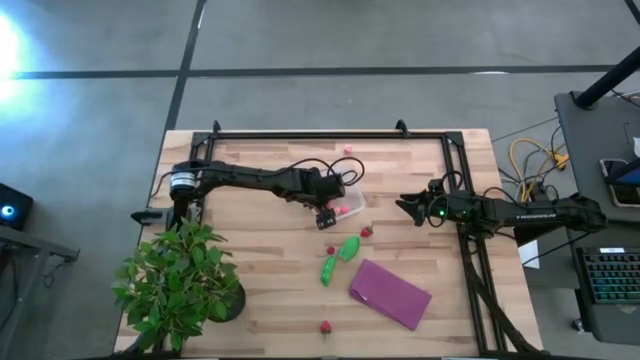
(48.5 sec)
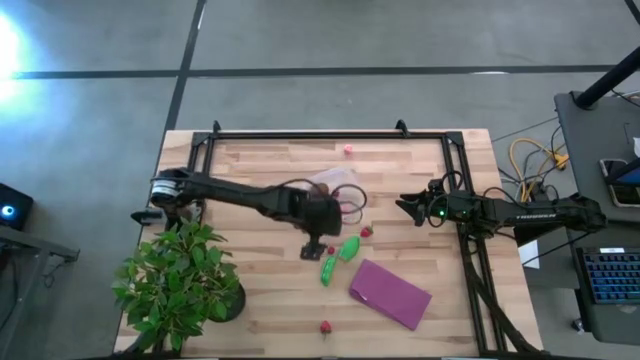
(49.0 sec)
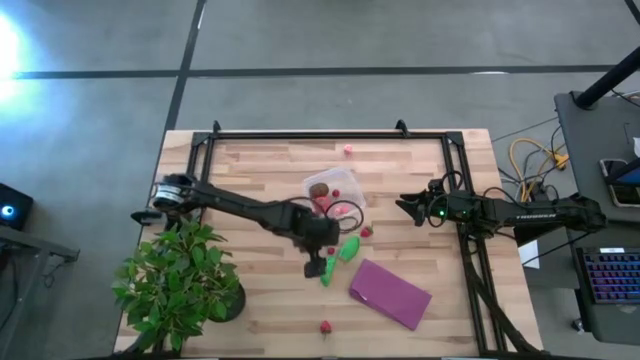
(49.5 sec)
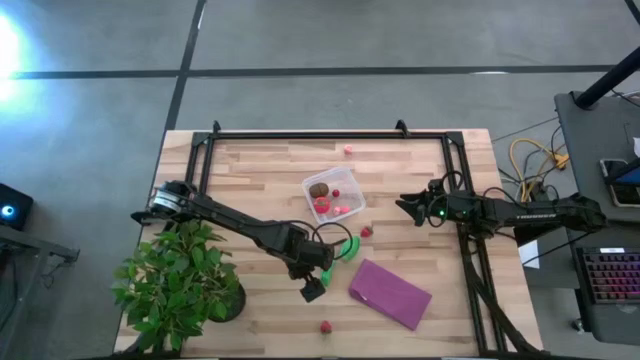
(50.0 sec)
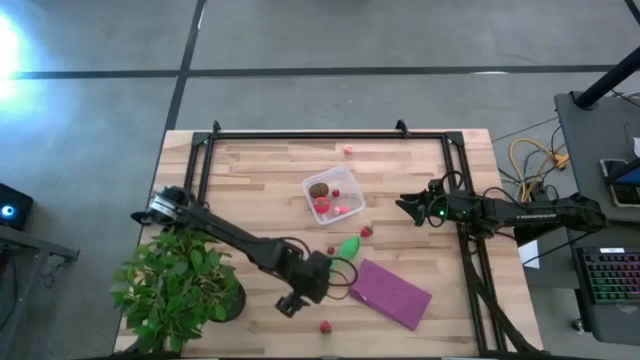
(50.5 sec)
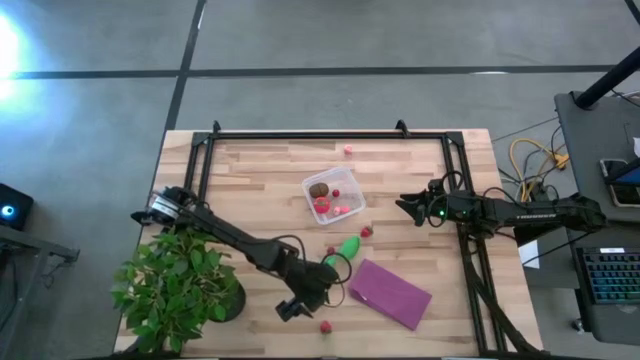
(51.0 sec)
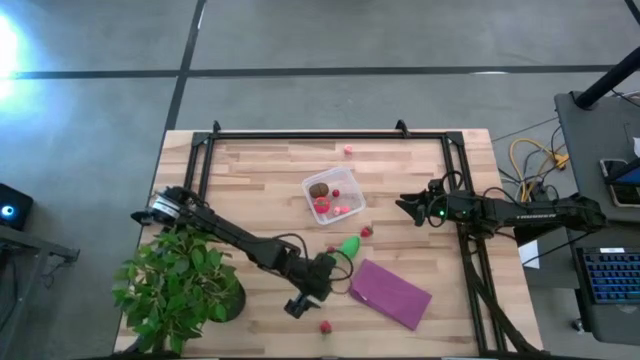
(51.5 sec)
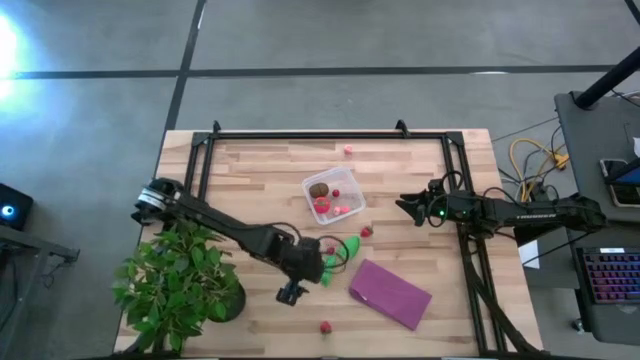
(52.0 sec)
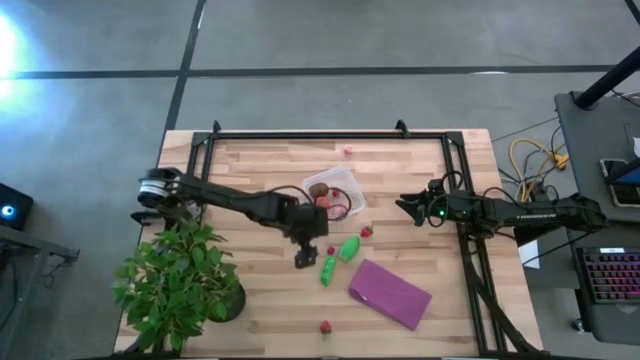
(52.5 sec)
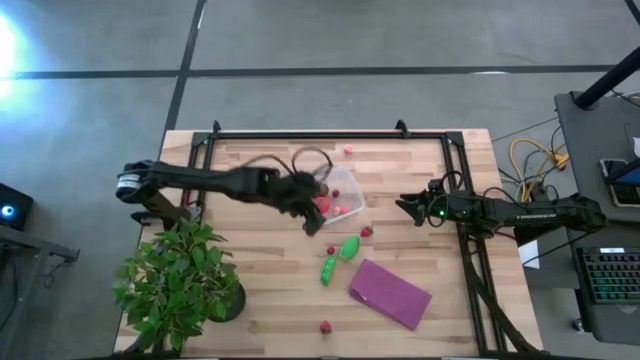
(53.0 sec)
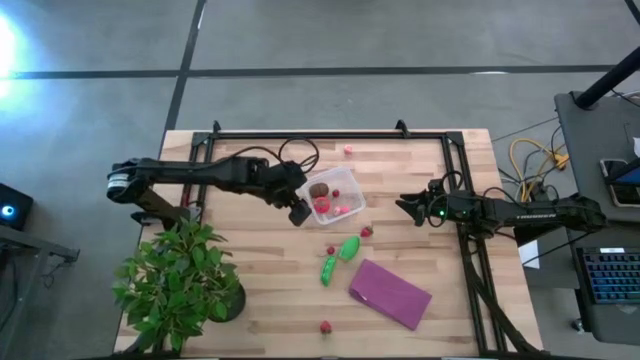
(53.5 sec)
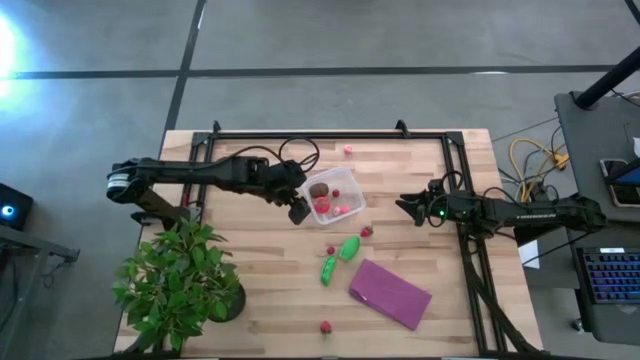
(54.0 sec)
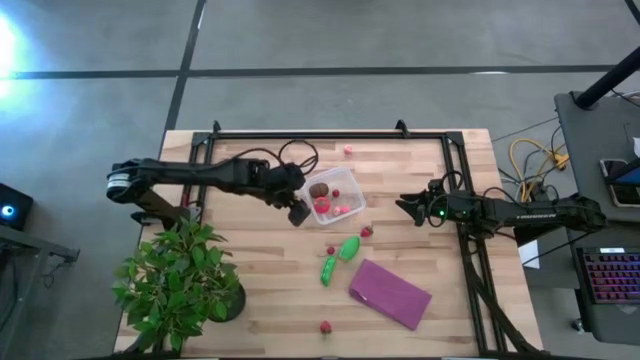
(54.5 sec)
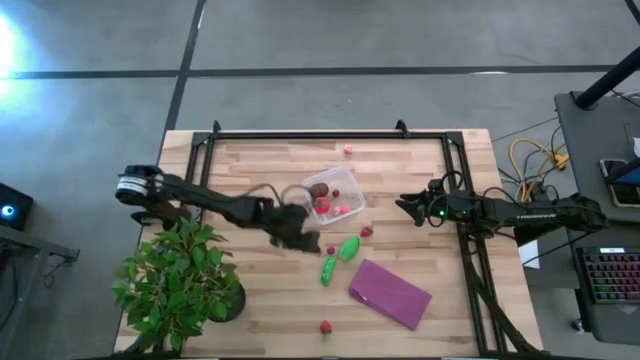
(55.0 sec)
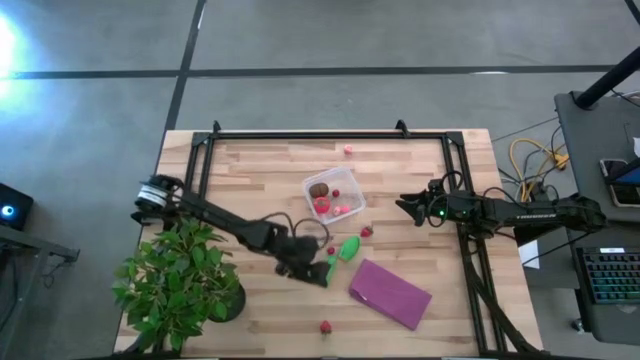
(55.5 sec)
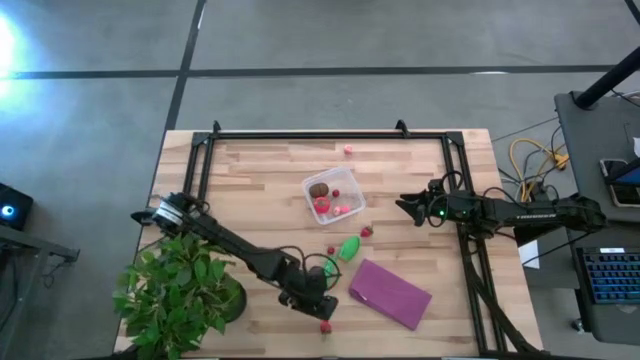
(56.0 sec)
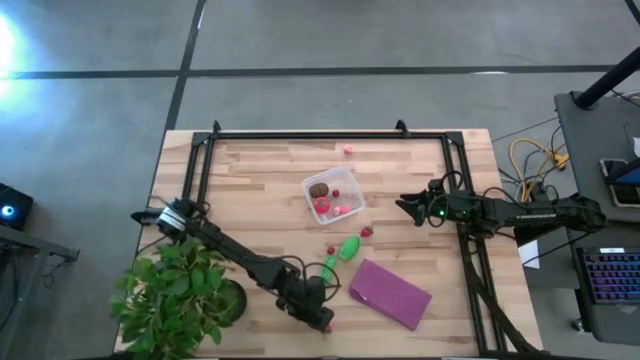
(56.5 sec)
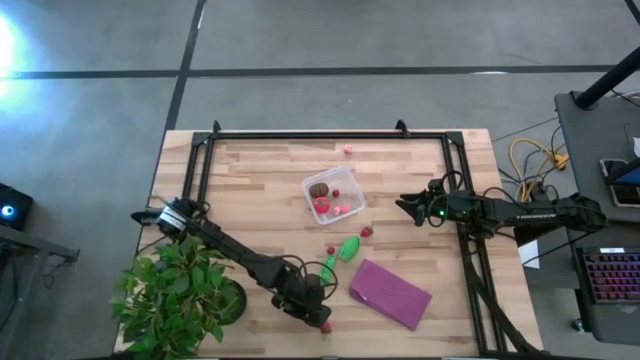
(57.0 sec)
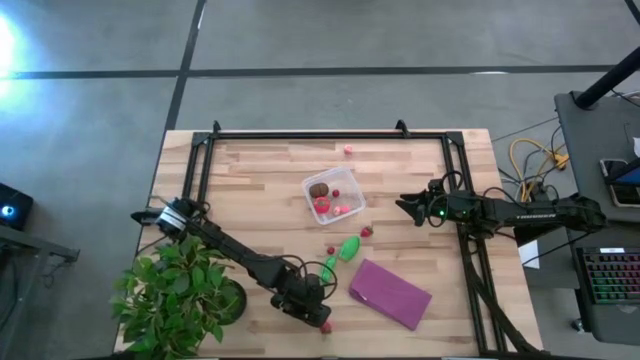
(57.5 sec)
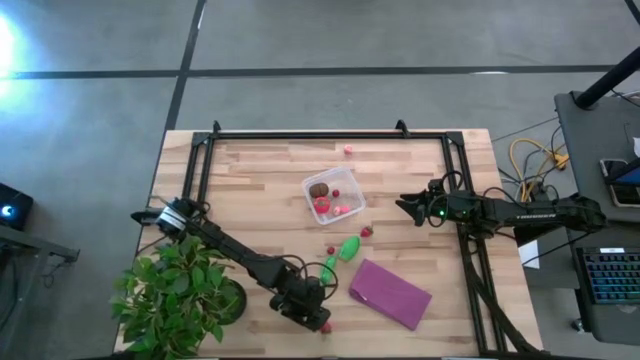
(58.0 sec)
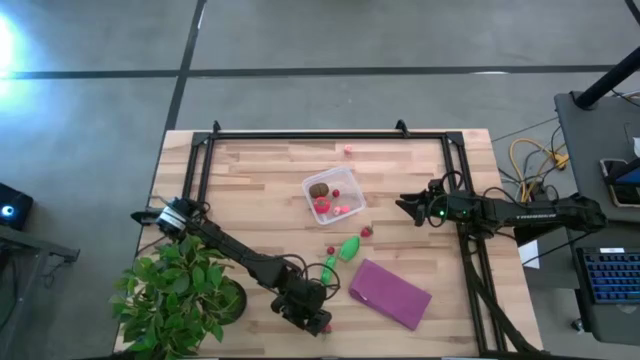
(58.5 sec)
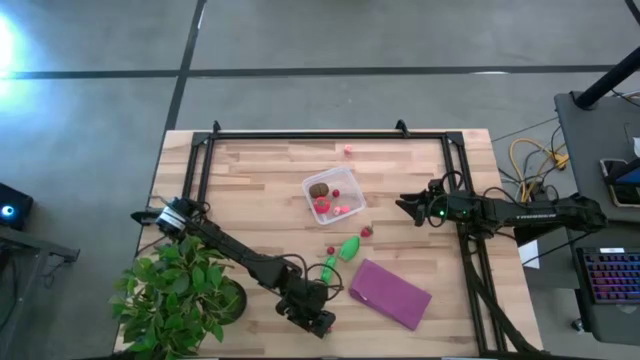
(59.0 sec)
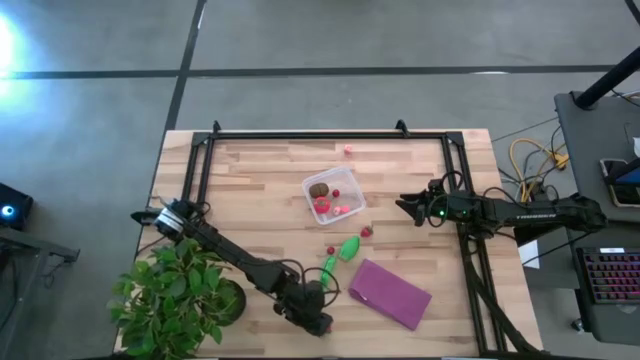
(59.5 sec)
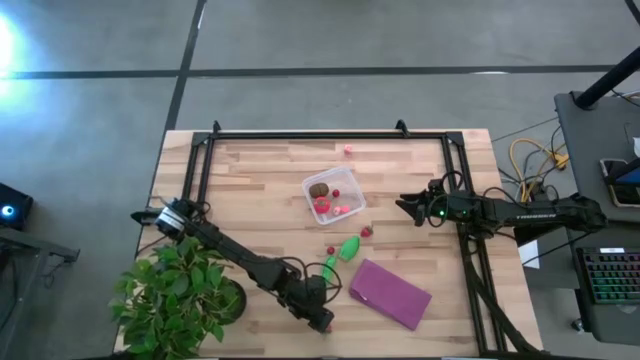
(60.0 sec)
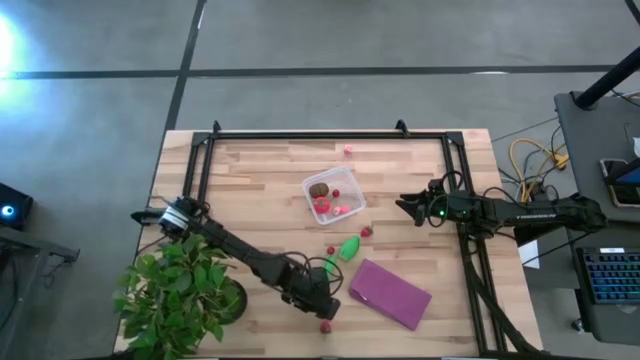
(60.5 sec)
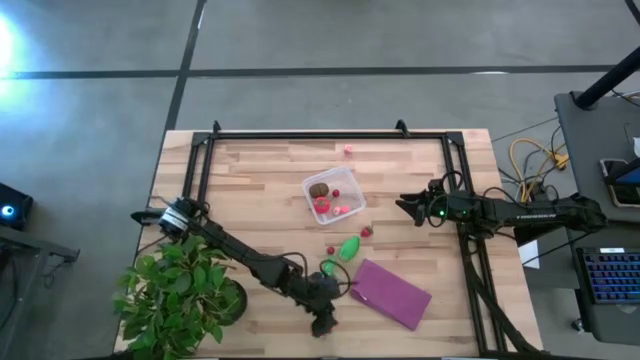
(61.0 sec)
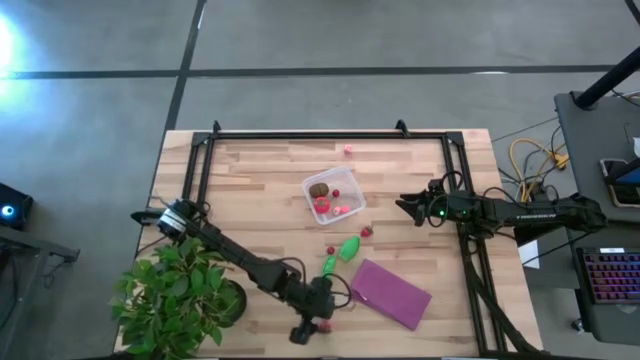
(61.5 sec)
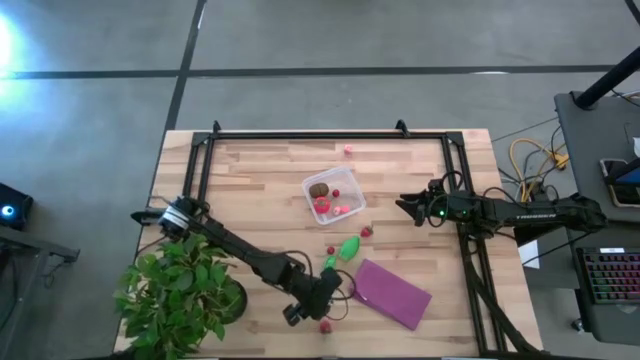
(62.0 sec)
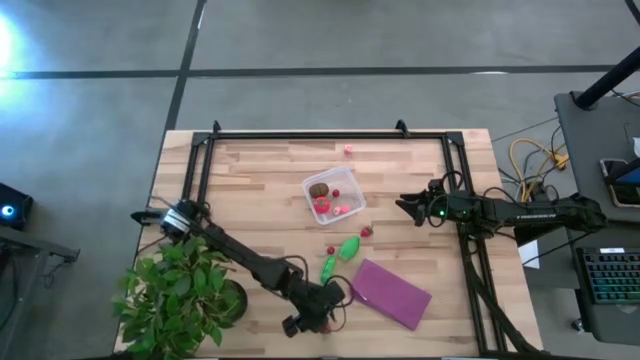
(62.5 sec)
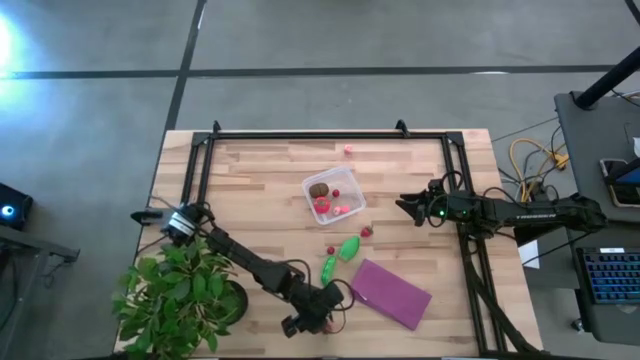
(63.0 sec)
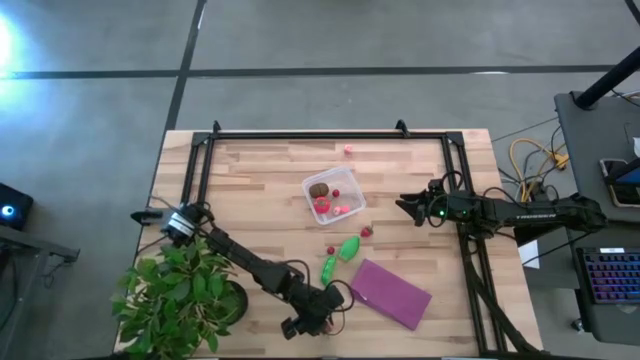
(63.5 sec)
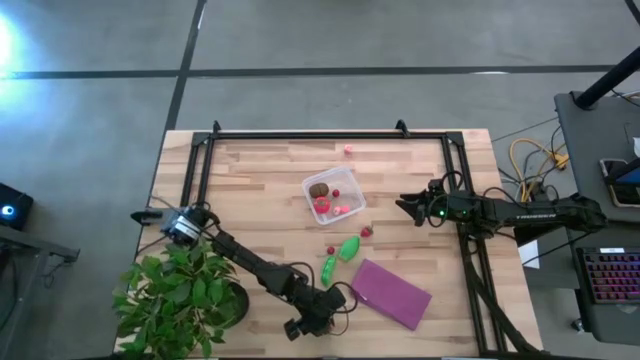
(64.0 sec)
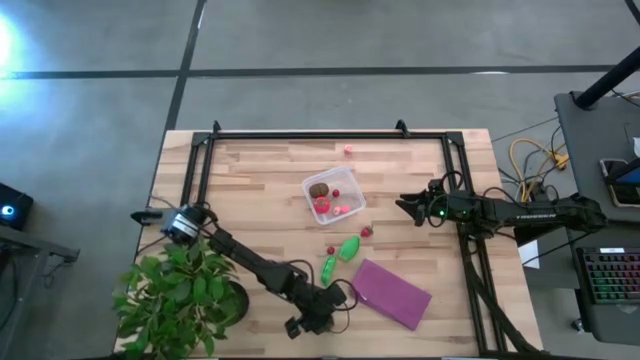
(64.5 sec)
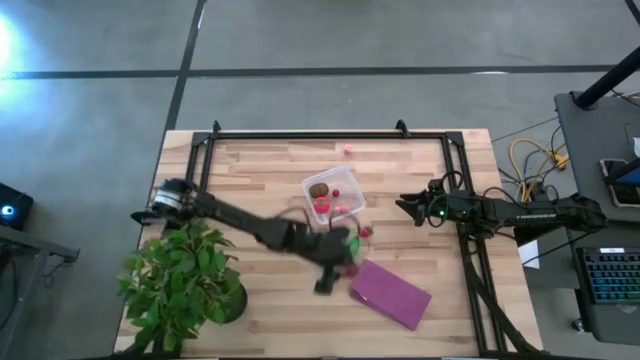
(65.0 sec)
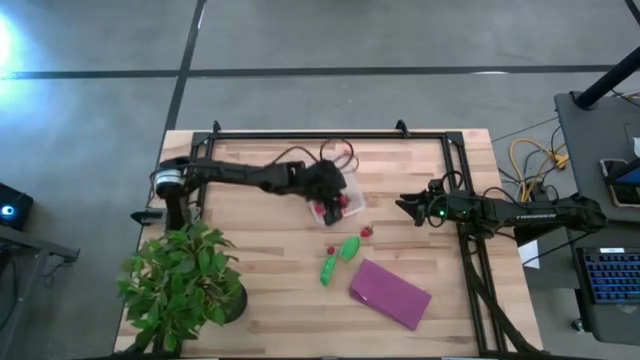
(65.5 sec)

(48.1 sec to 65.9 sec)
Task: Pick and placing Produce into tupperware
Put the bottom red strawberry into the transparent bin

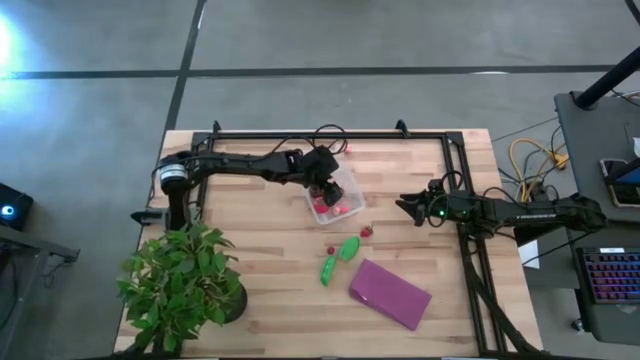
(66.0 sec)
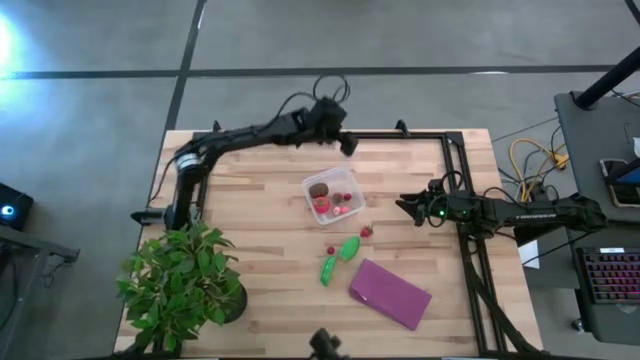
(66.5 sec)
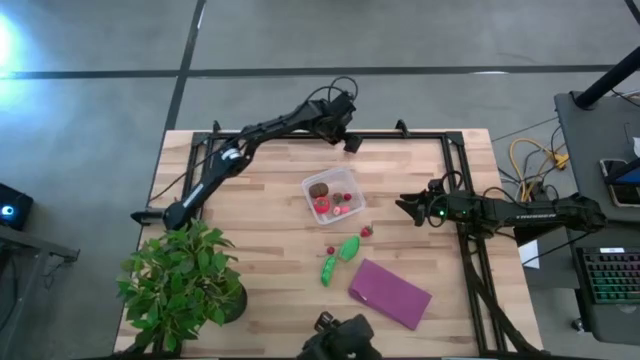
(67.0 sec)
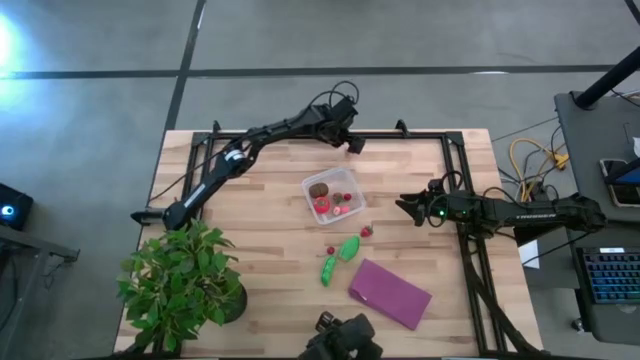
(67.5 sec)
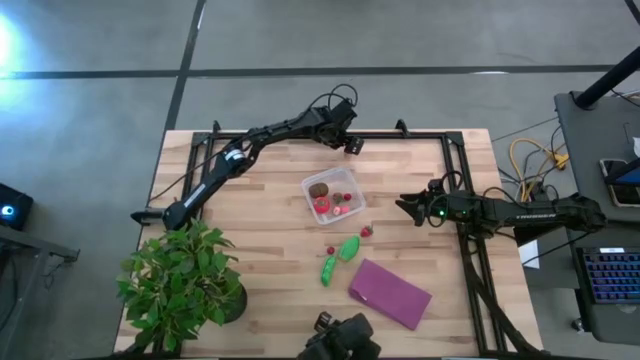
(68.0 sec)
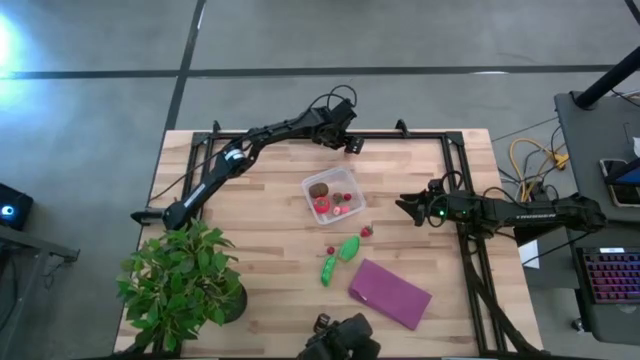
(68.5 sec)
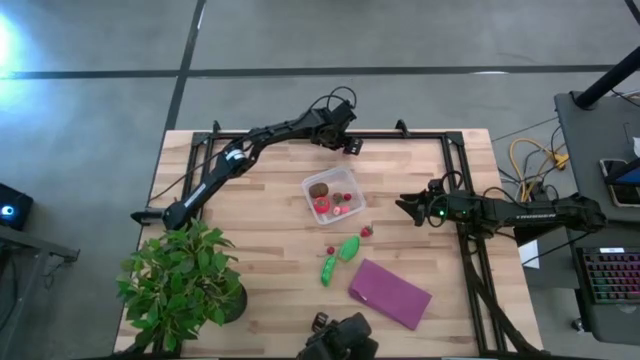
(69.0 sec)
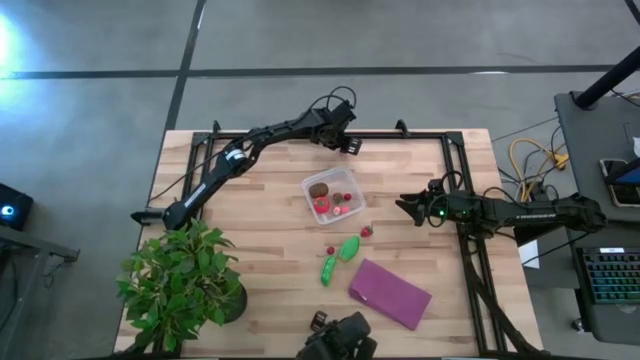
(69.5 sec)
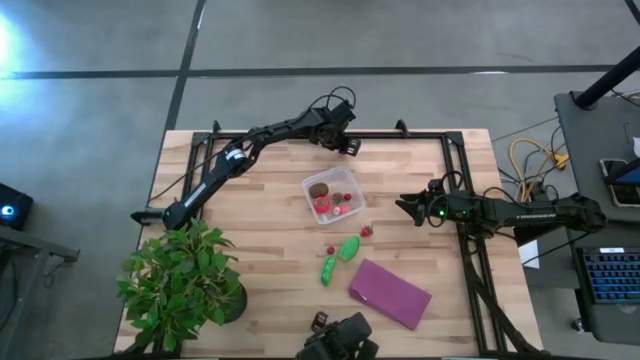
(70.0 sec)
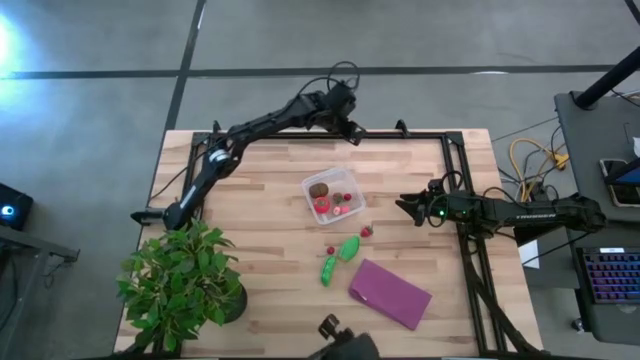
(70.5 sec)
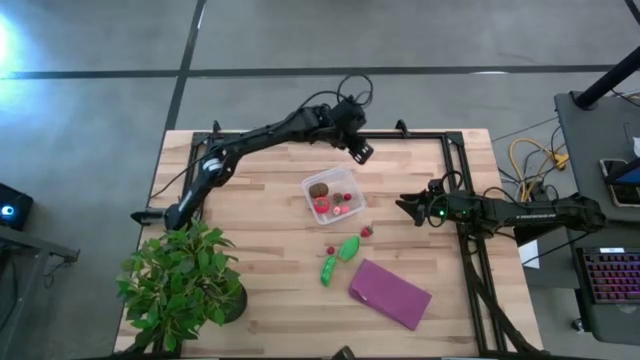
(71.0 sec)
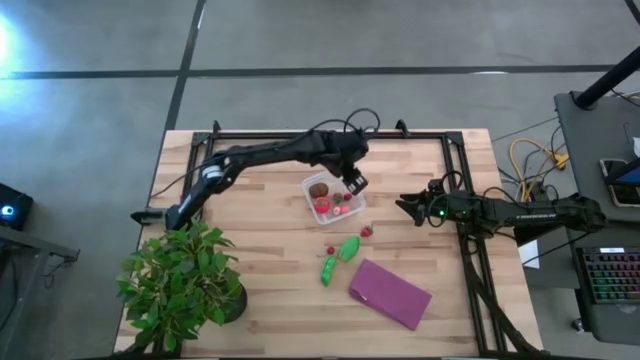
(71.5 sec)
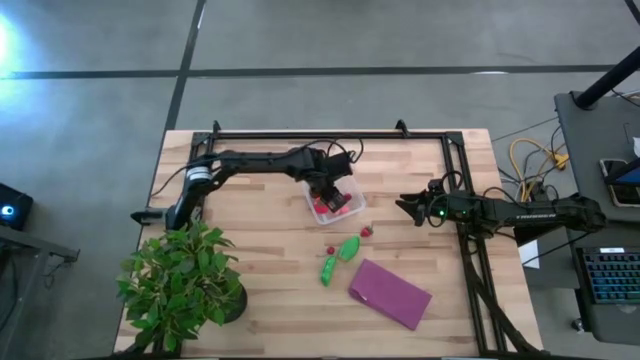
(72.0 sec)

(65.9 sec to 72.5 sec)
Put the pink peach into the transparent bin
